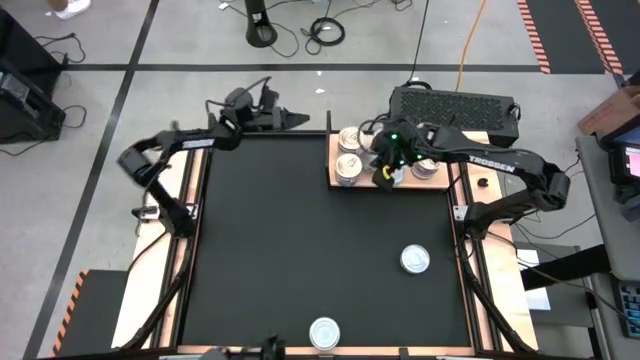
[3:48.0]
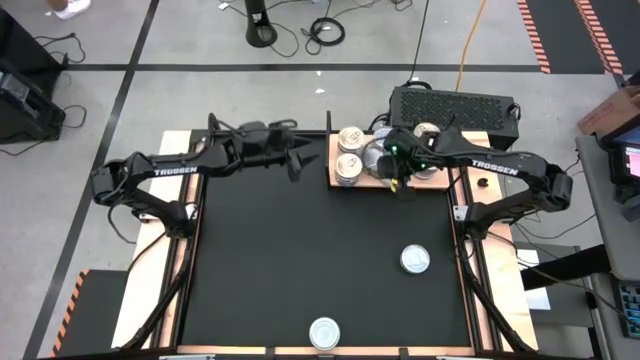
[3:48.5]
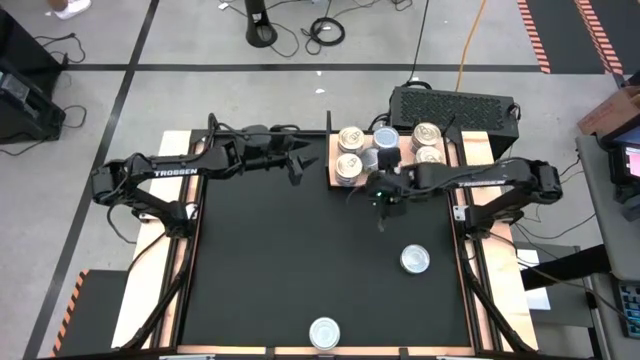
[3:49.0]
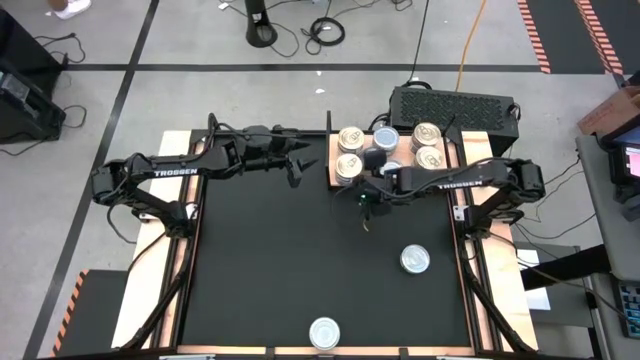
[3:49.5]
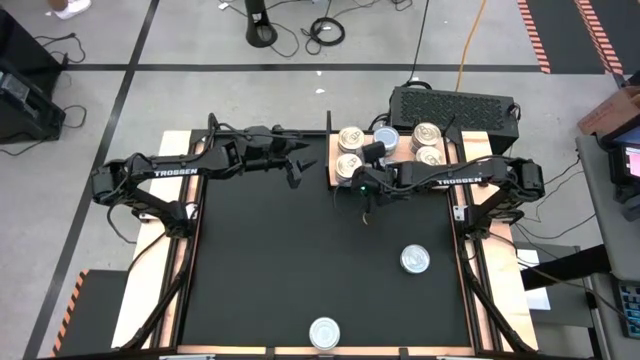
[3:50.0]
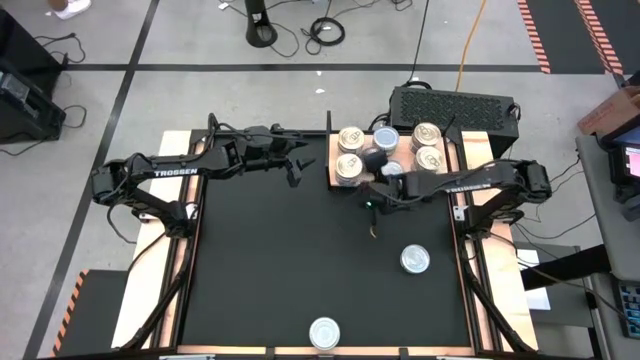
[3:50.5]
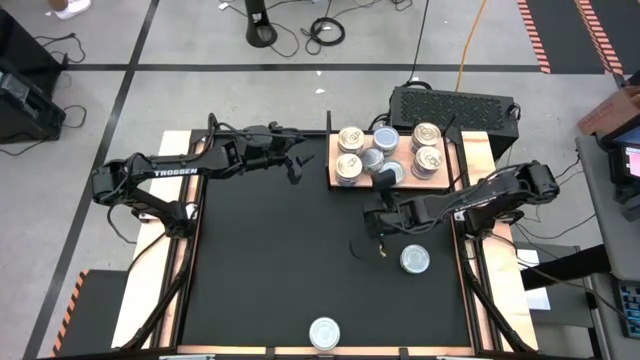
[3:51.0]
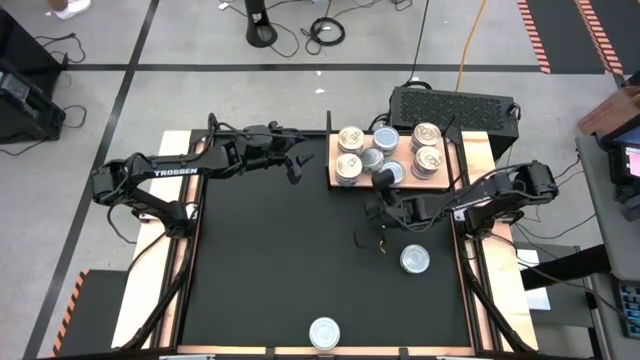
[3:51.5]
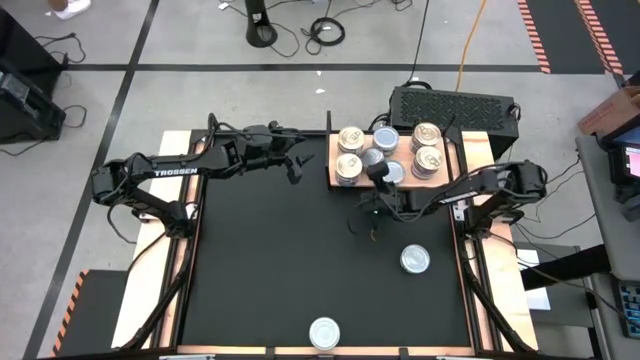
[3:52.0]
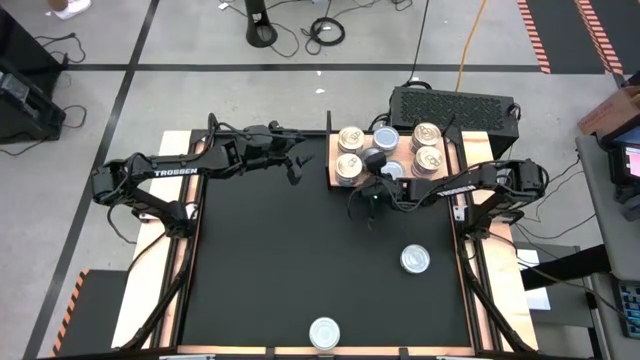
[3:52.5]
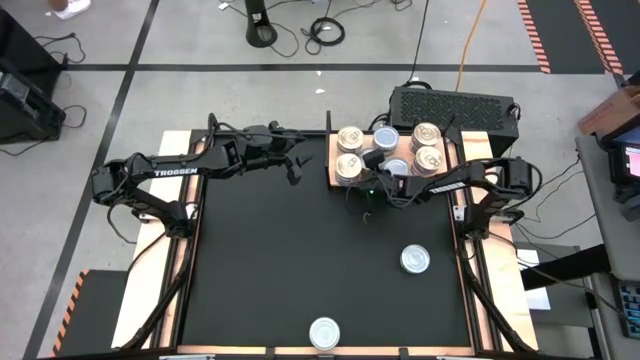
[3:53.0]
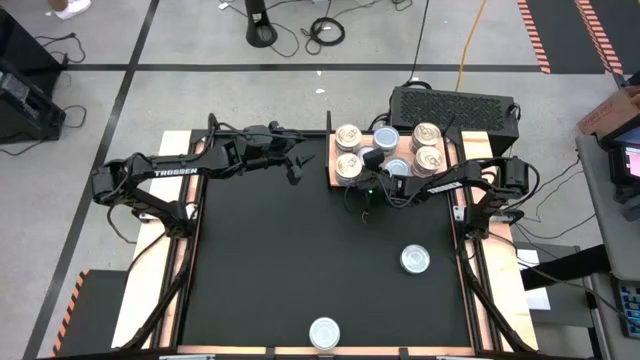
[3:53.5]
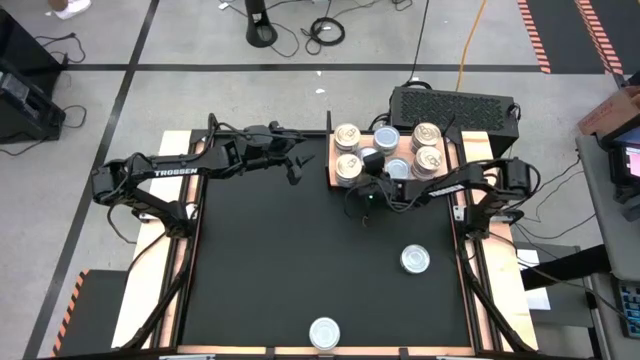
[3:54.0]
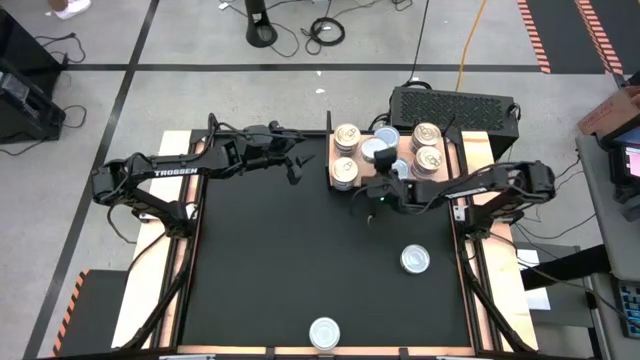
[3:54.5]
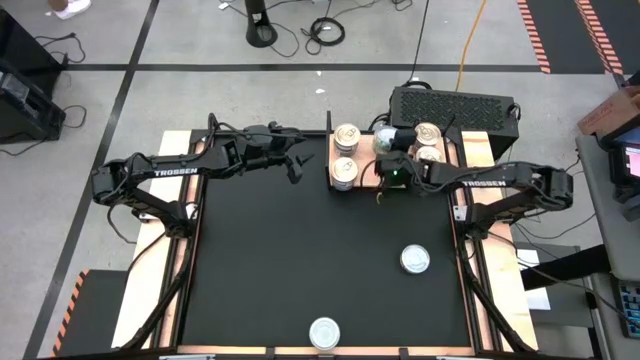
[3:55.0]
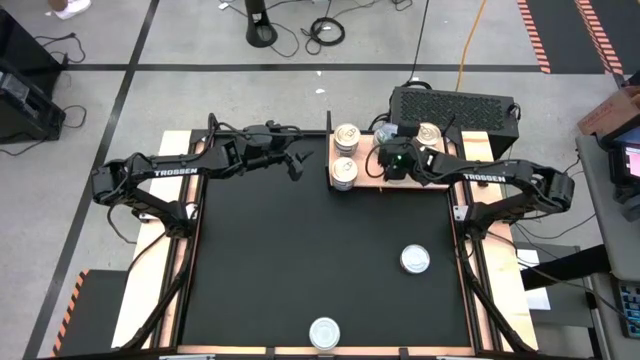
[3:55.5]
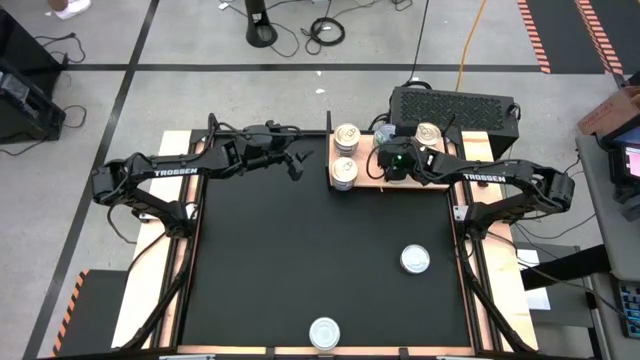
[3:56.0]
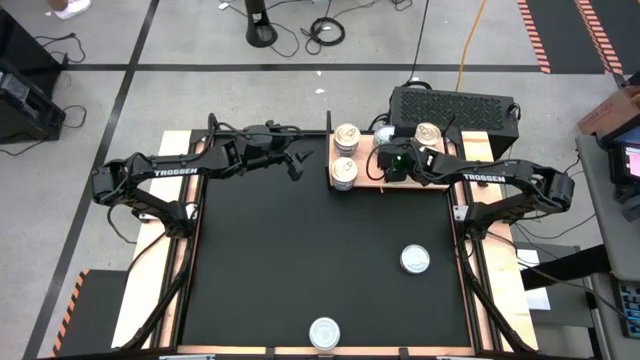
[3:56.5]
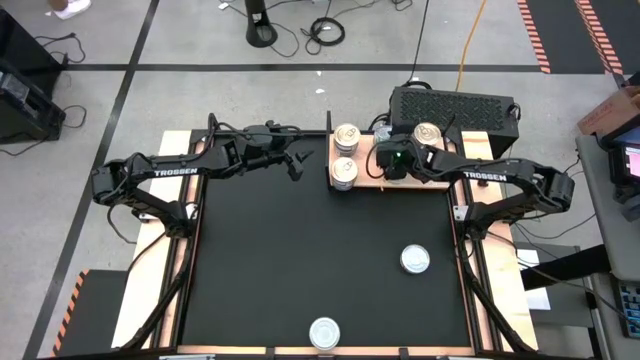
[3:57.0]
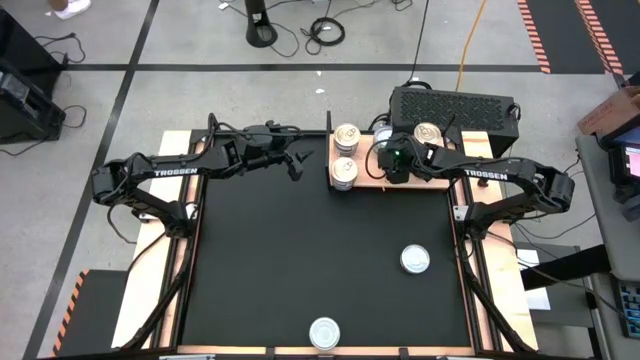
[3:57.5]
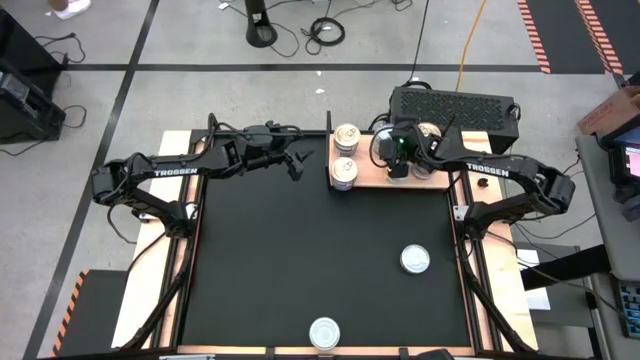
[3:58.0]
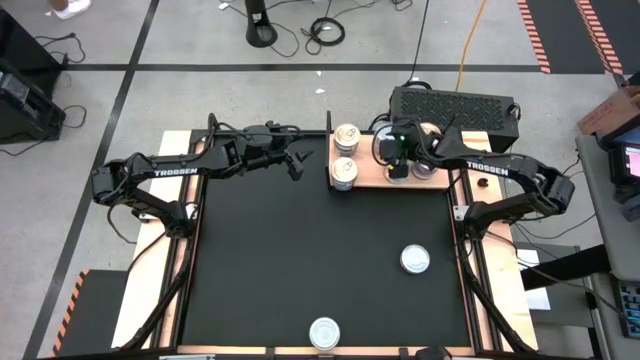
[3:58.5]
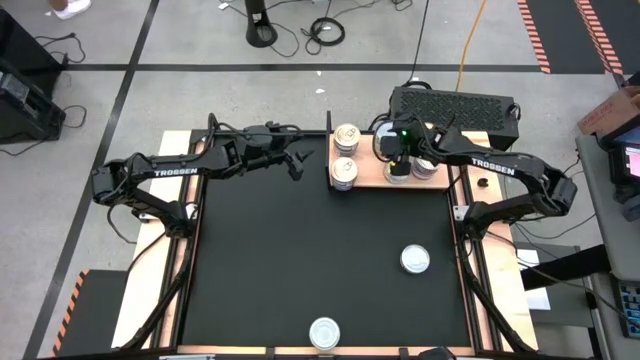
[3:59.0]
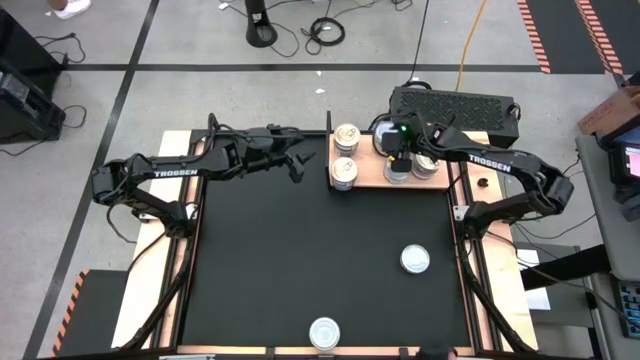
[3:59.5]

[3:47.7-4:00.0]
Task: Stack canned seafood by type on shelf
Stack the green tuna can on top of the other green tuna can on the shelf

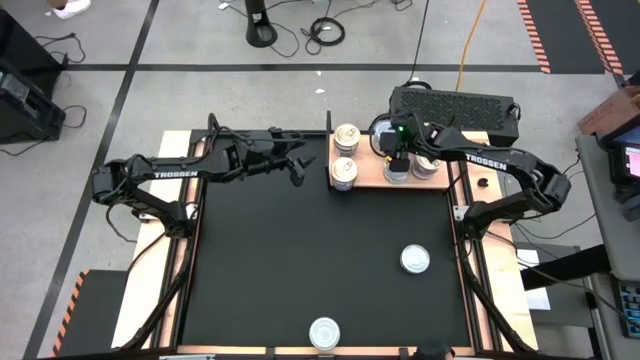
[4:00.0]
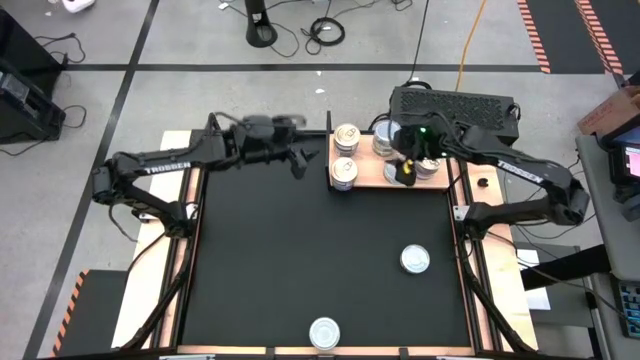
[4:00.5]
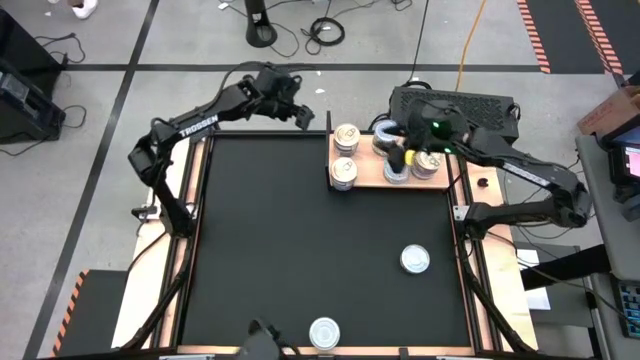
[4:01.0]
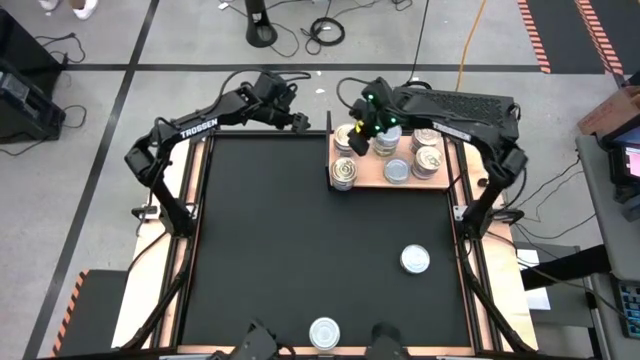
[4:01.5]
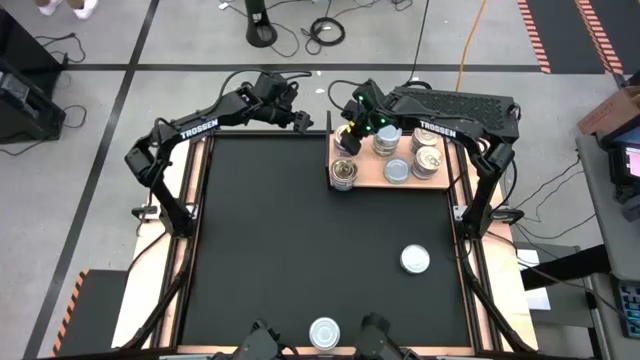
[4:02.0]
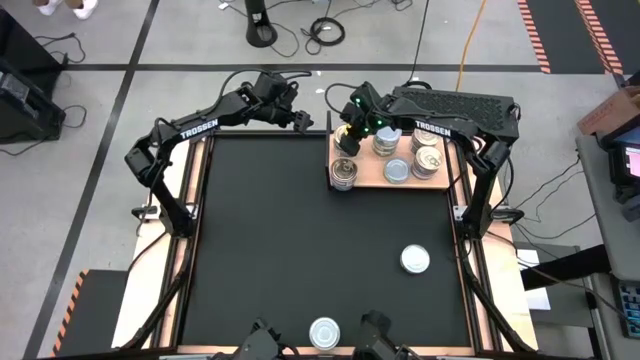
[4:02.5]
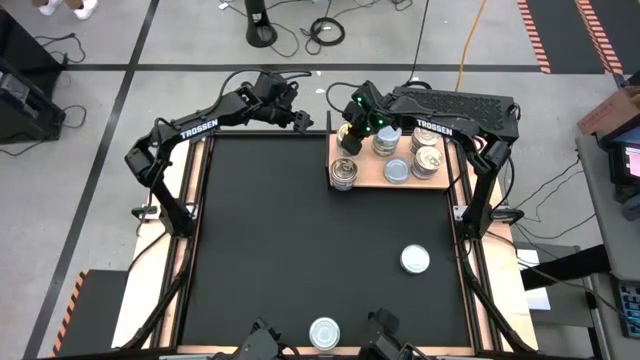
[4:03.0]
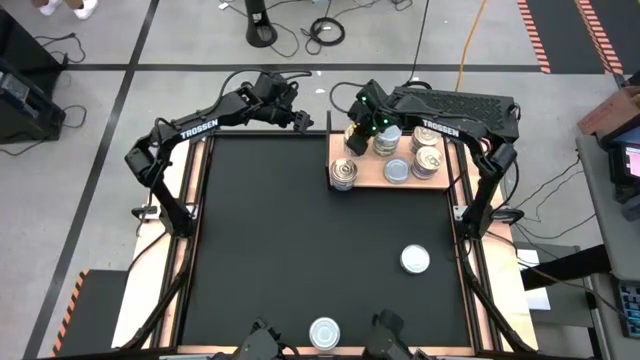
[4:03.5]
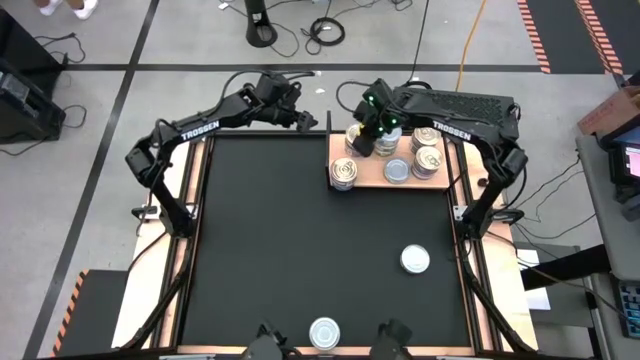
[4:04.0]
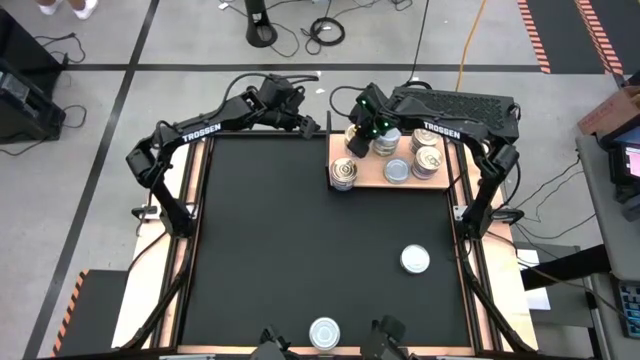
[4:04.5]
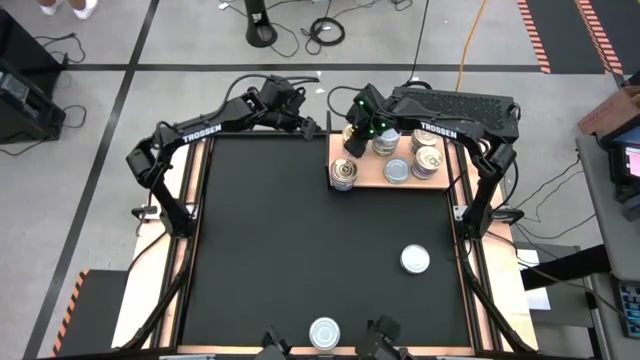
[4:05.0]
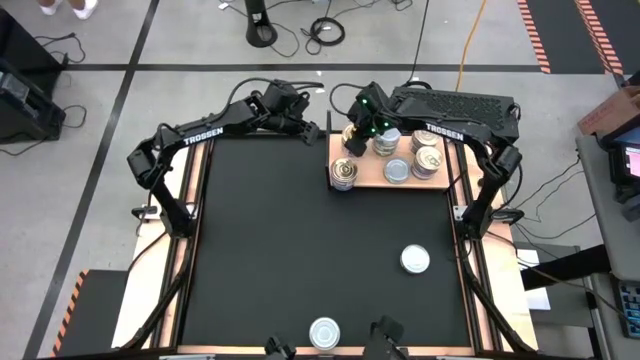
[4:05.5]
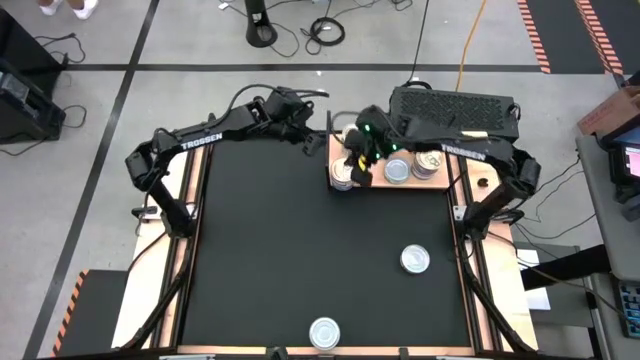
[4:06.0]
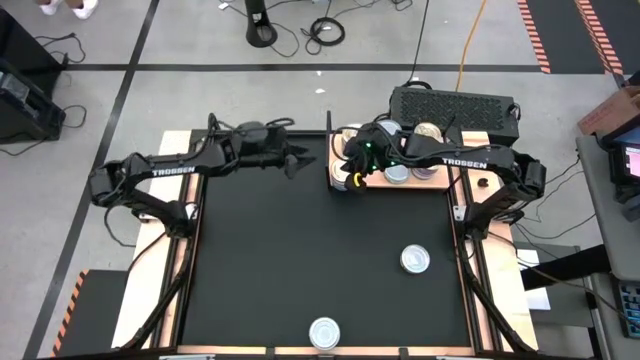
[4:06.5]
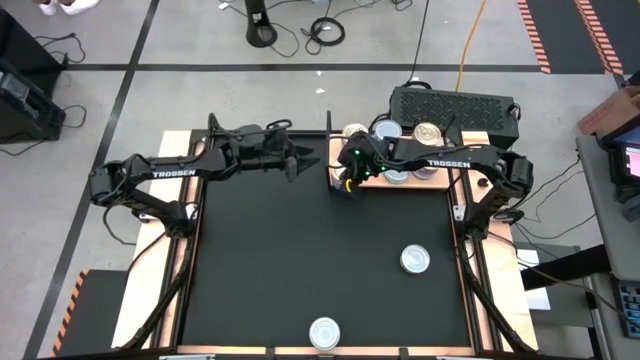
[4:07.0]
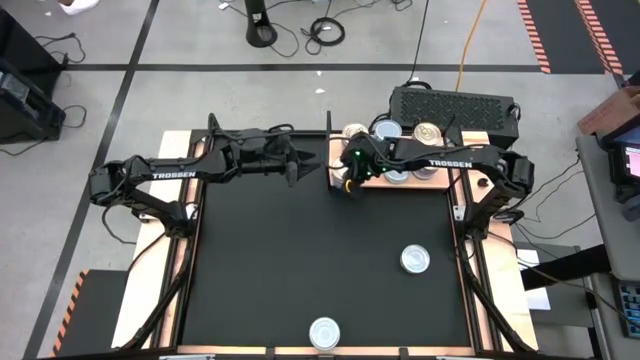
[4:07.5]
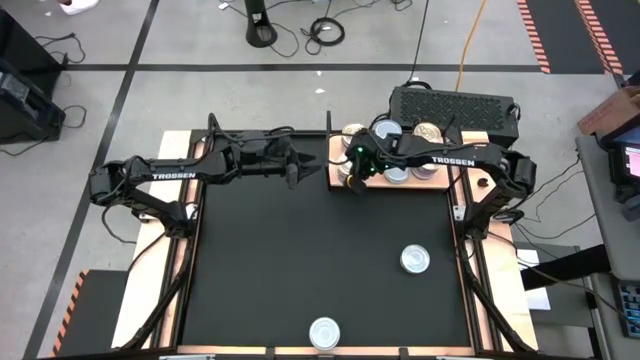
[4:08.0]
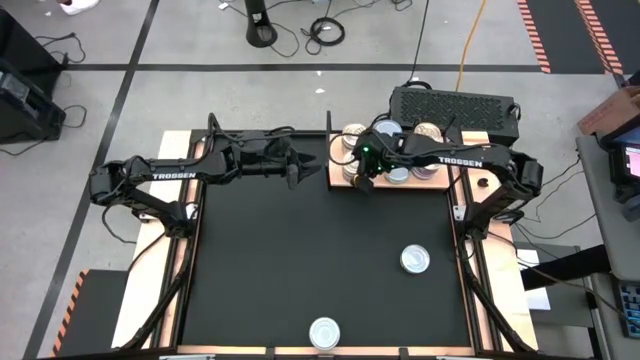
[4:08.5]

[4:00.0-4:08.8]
Adjust the stacked blue pink tuna cans on the shelf
